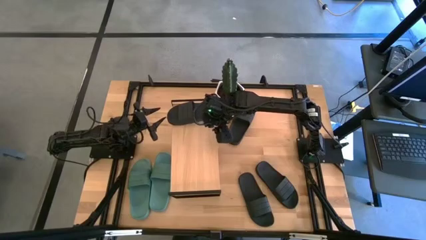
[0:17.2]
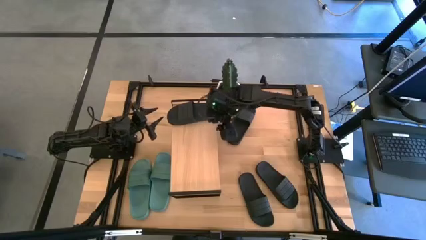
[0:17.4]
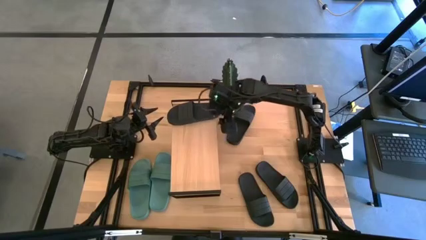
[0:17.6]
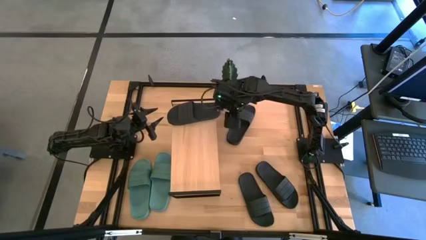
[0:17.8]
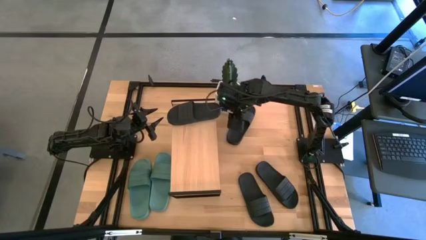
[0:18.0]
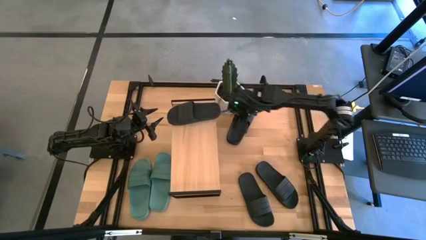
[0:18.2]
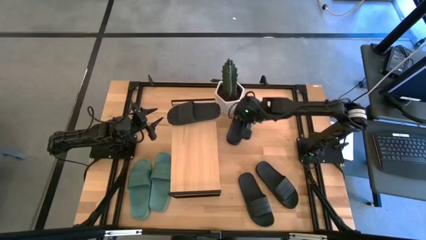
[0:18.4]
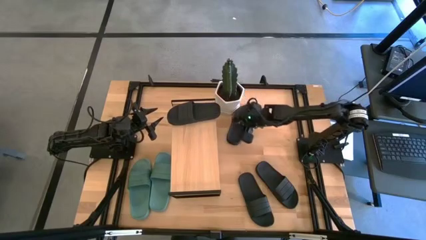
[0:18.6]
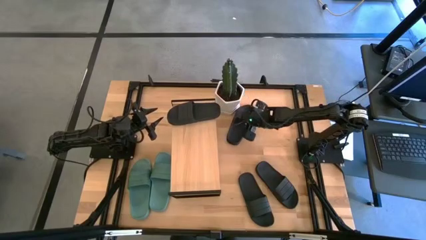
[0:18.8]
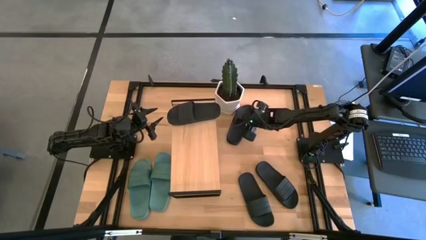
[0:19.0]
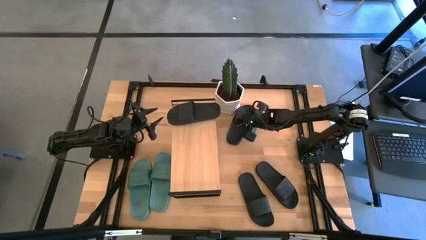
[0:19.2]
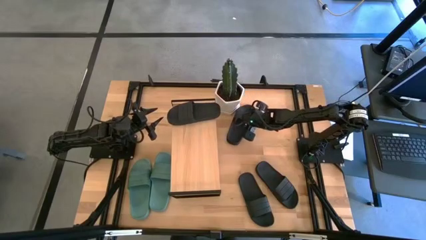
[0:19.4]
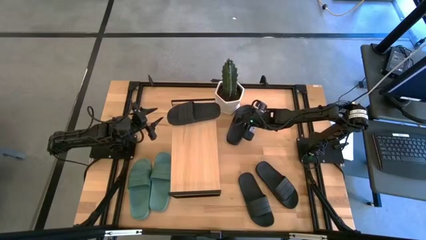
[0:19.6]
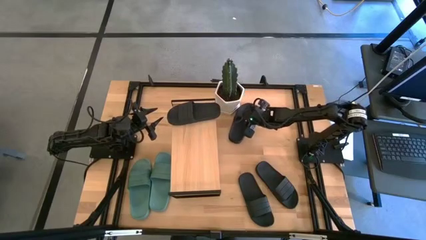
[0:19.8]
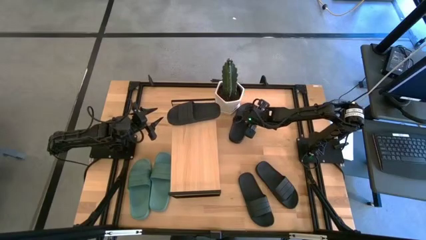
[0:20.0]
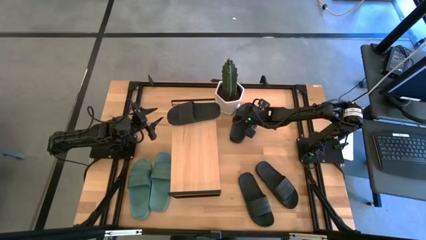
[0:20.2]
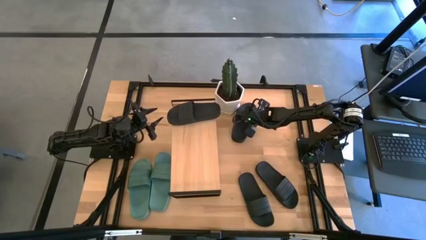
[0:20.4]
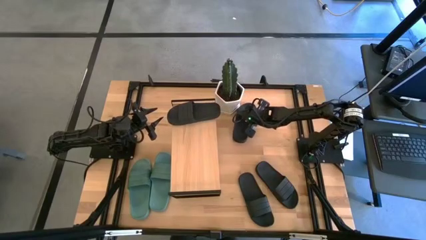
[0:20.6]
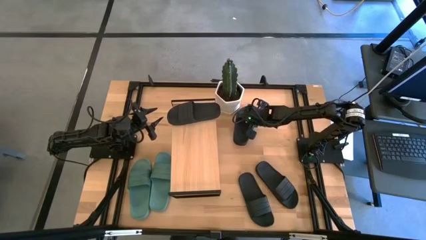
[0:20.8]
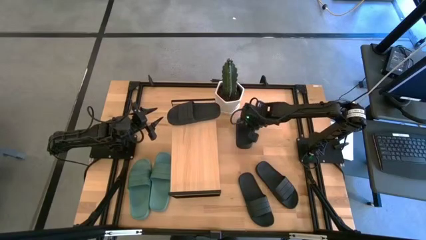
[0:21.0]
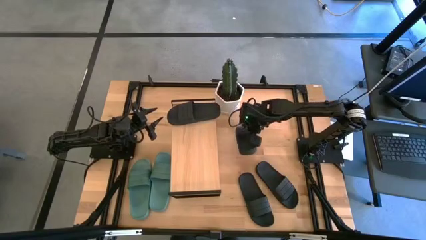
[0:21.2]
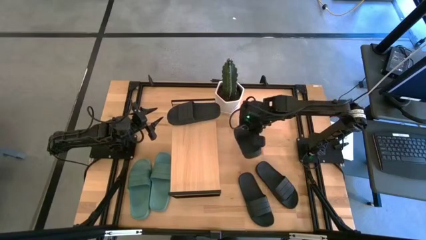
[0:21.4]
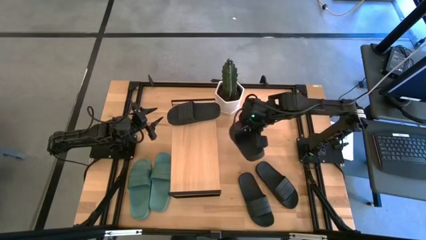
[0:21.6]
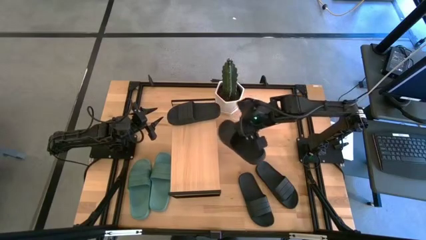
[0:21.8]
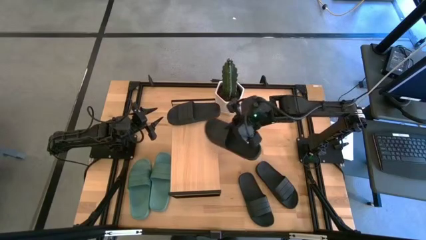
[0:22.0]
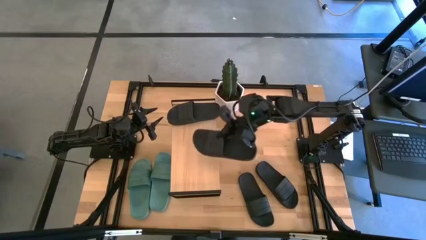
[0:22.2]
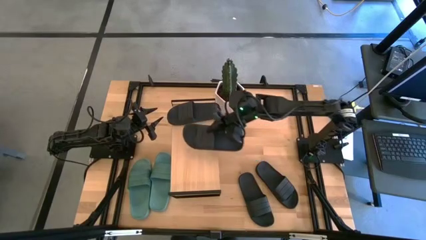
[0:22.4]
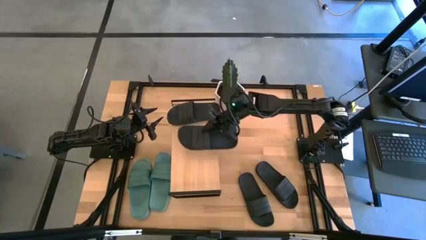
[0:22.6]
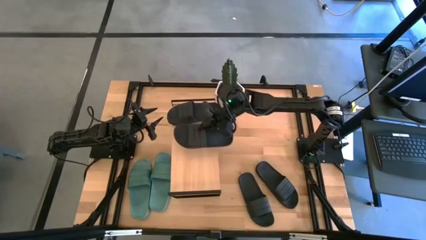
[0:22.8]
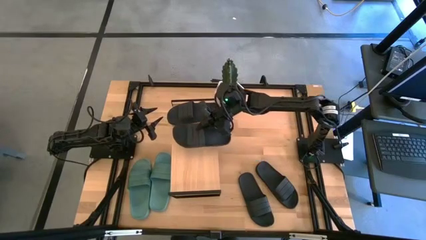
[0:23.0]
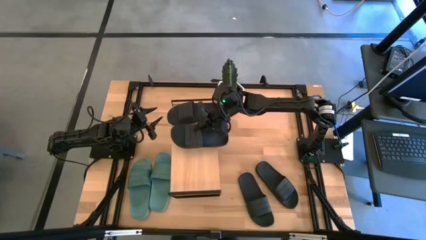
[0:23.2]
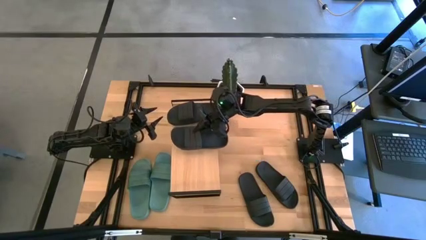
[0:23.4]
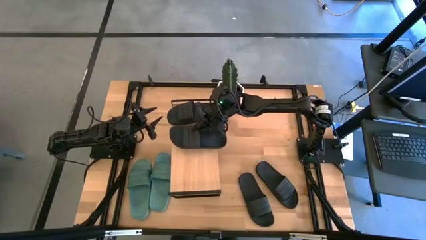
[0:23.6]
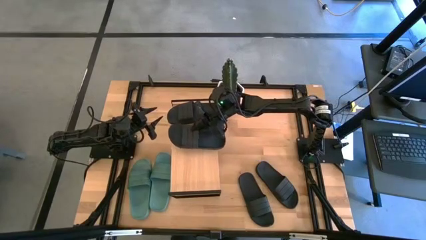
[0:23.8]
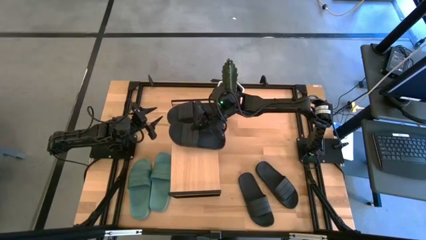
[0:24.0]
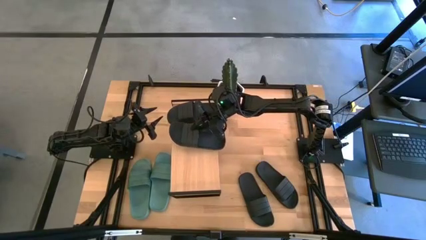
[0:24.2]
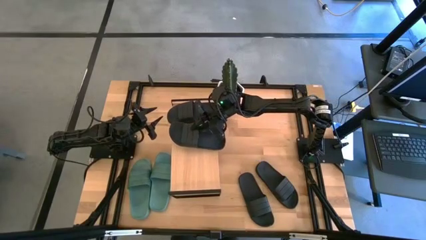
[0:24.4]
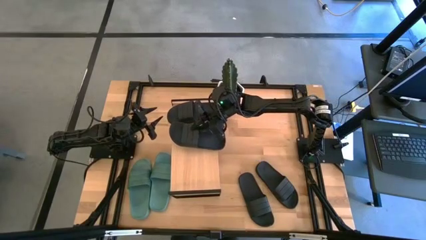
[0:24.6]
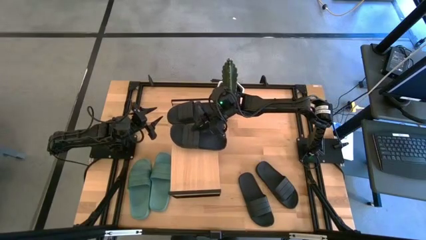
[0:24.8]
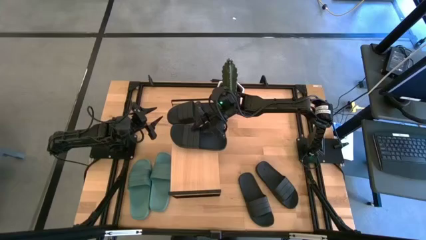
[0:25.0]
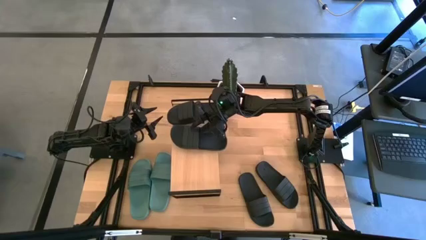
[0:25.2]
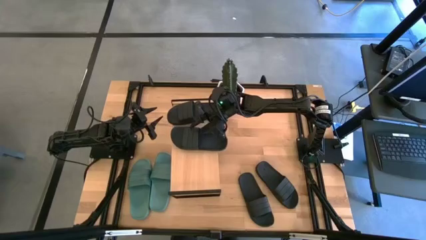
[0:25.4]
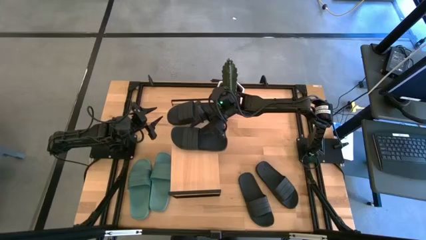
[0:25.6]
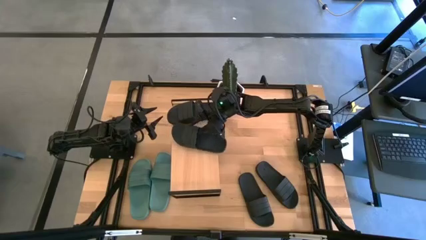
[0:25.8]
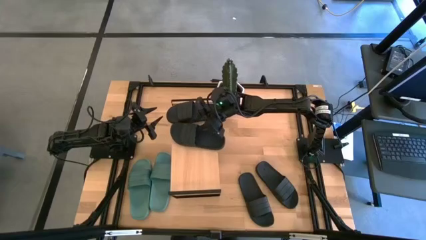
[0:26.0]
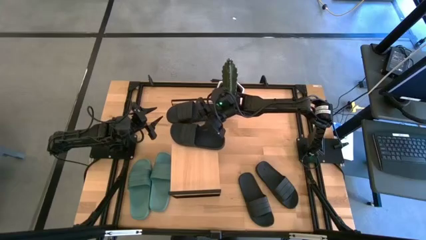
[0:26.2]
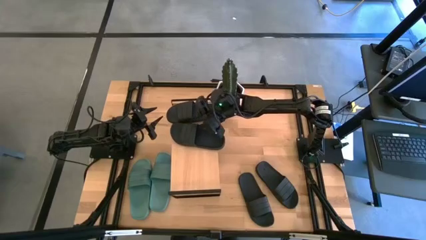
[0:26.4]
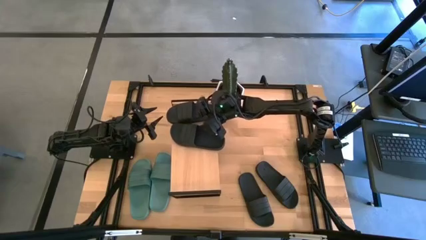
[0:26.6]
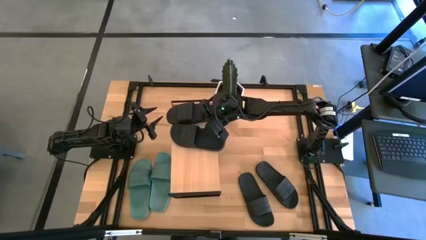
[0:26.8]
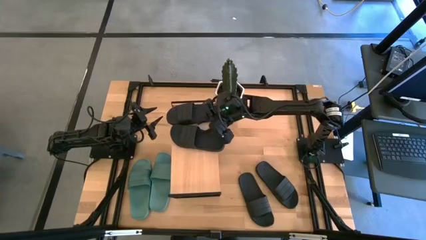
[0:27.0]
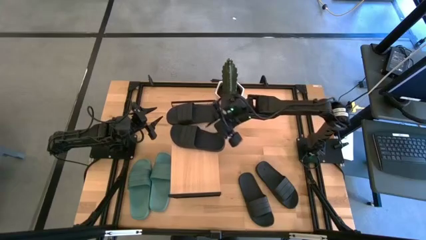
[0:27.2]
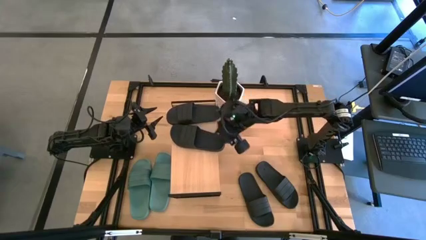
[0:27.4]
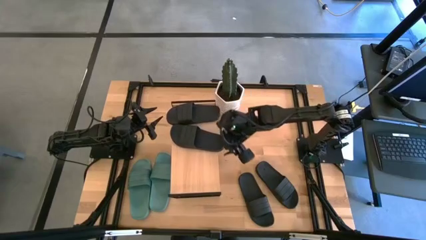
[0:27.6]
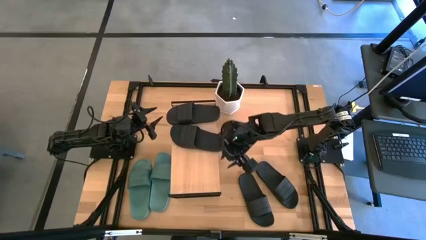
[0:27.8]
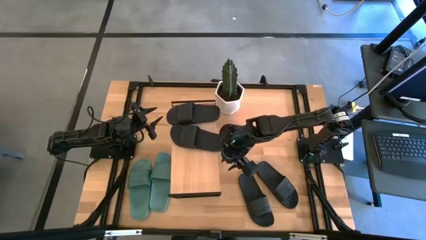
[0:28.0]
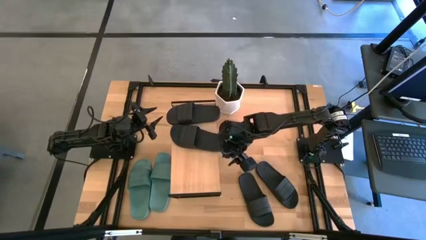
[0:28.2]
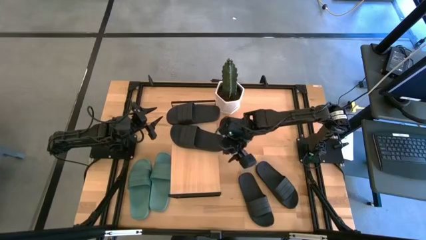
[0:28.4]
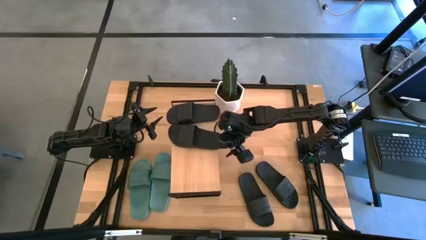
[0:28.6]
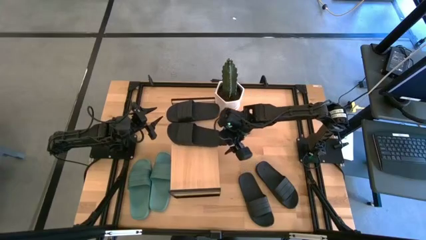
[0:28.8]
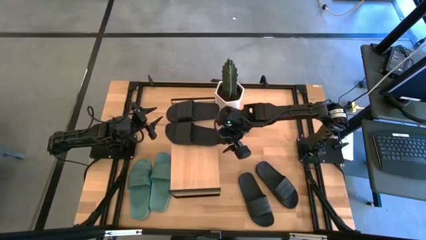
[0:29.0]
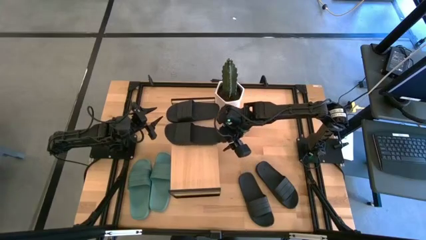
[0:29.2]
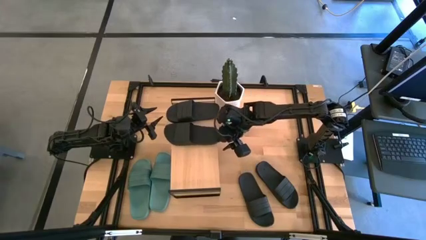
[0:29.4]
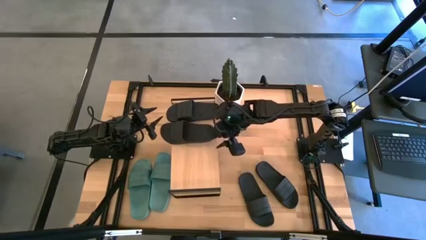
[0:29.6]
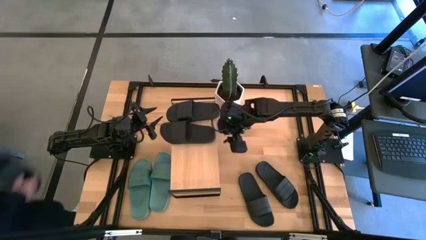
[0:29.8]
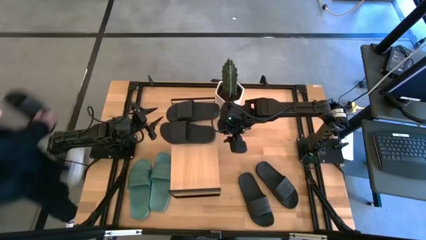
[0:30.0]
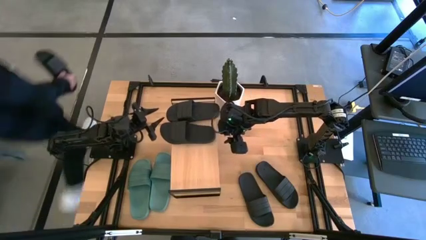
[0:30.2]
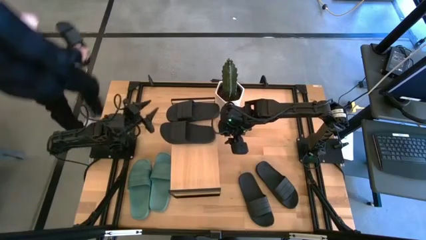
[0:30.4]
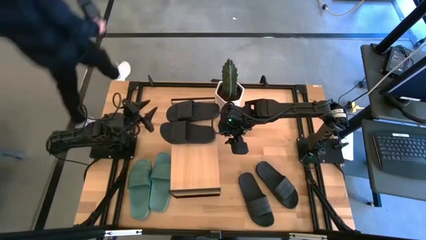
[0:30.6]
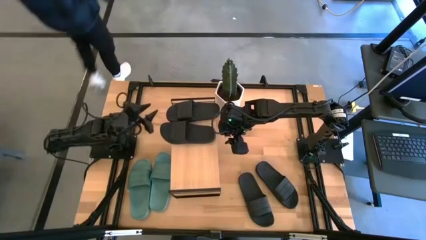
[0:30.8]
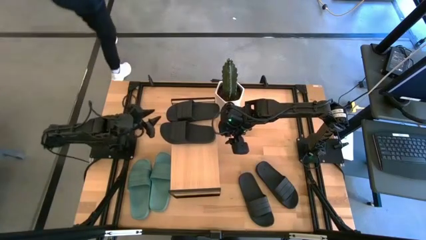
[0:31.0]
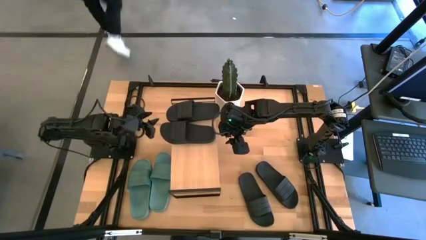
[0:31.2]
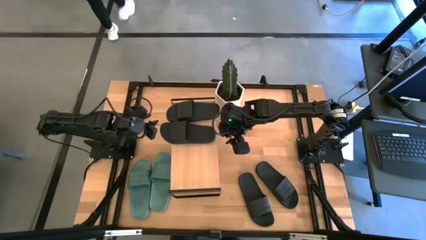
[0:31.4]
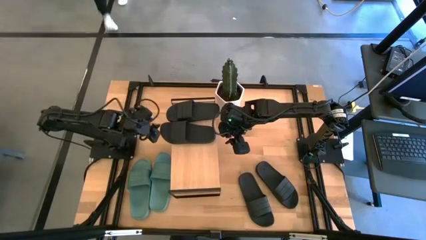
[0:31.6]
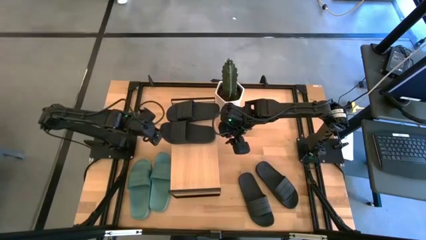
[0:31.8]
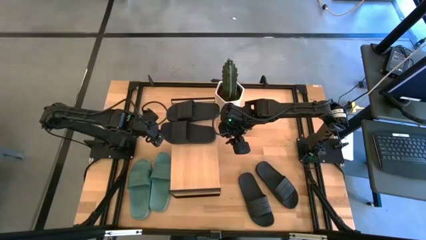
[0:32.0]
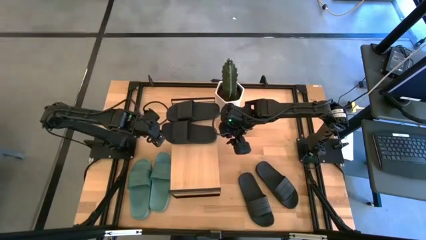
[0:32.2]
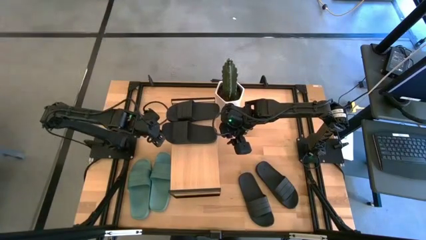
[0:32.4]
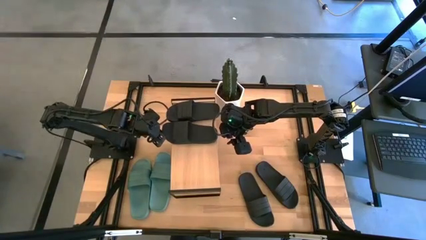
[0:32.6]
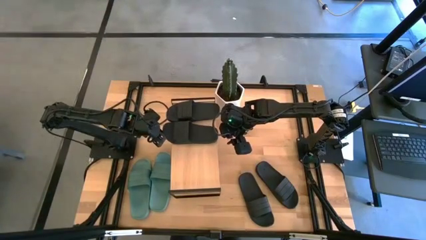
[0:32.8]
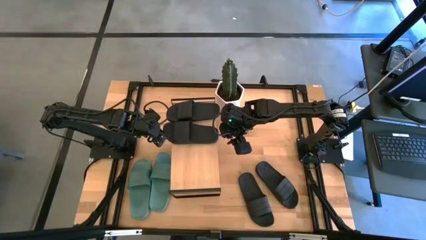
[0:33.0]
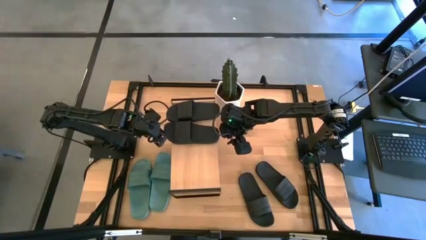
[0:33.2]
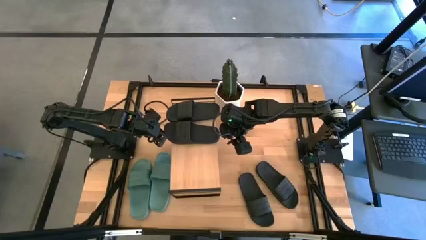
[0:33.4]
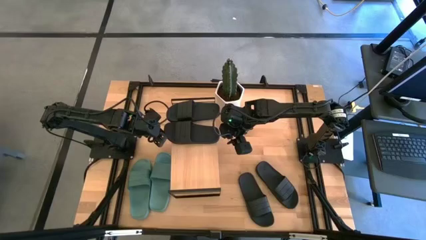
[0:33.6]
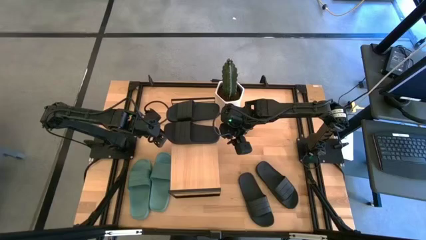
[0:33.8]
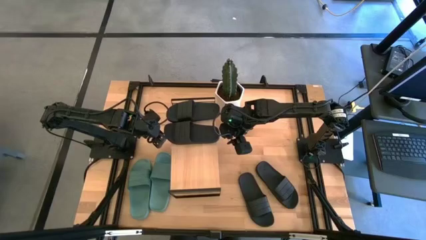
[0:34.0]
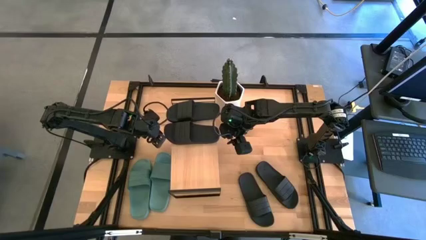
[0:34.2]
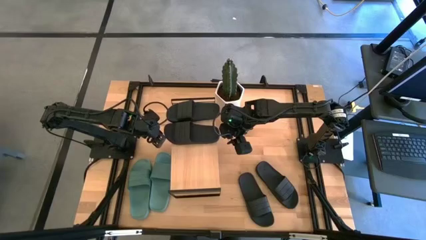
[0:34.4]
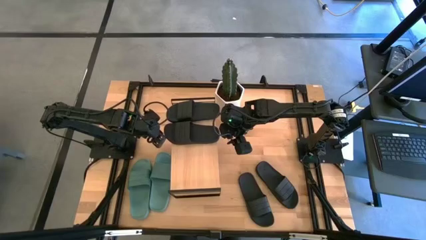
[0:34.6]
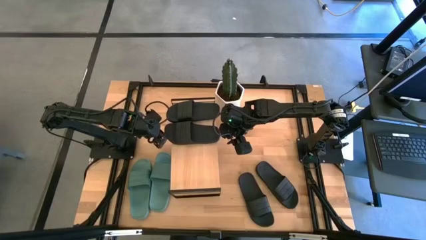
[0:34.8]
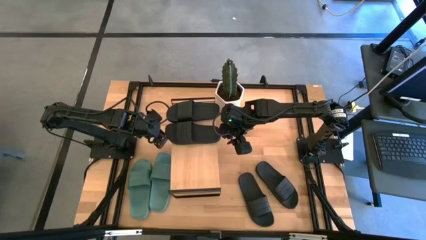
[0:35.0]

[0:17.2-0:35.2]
Task: Pick and place slides into the shelf
Put the black slides on the shelf
